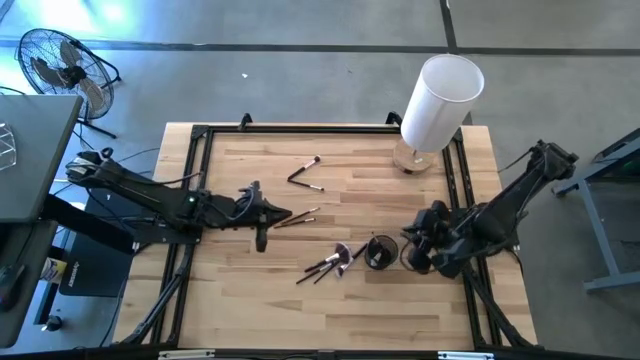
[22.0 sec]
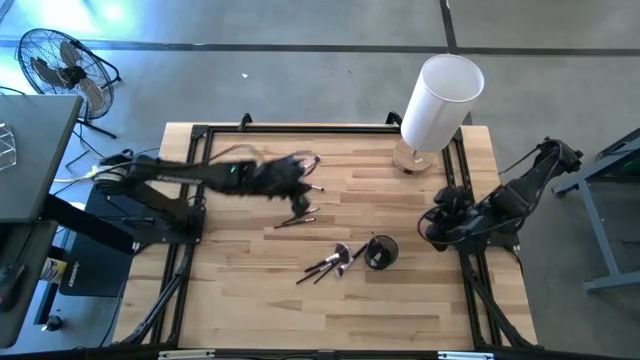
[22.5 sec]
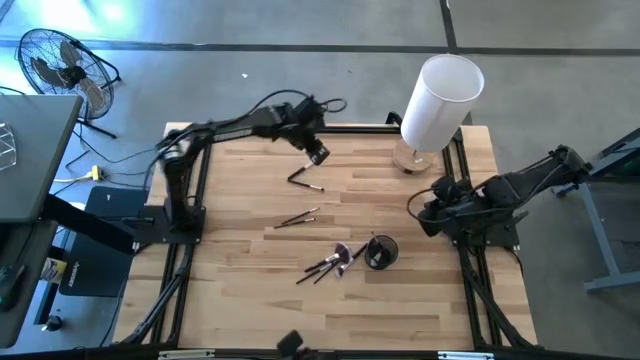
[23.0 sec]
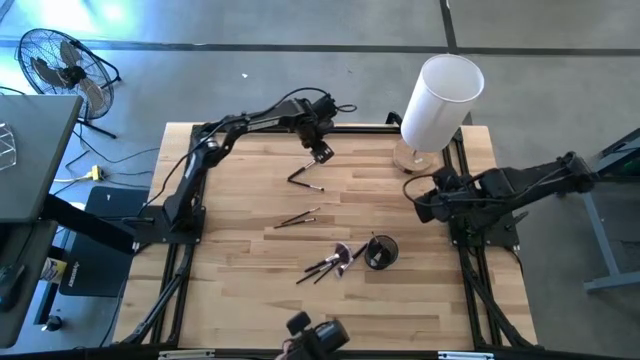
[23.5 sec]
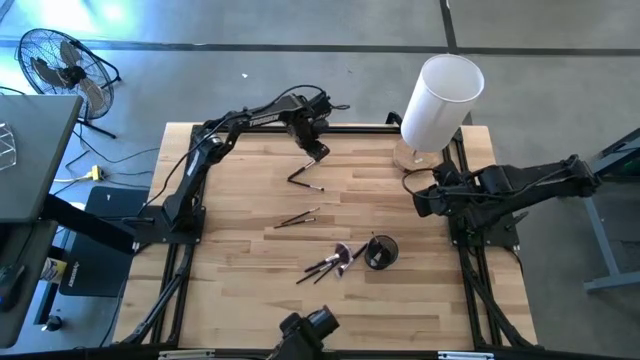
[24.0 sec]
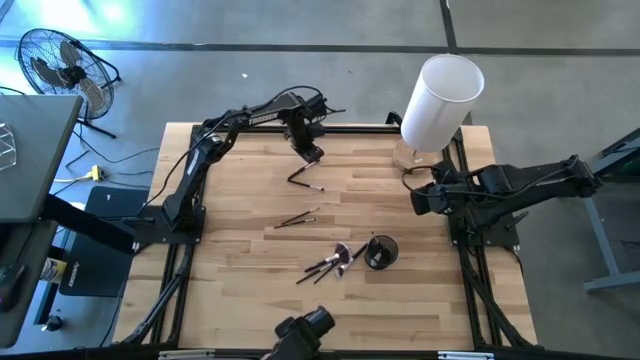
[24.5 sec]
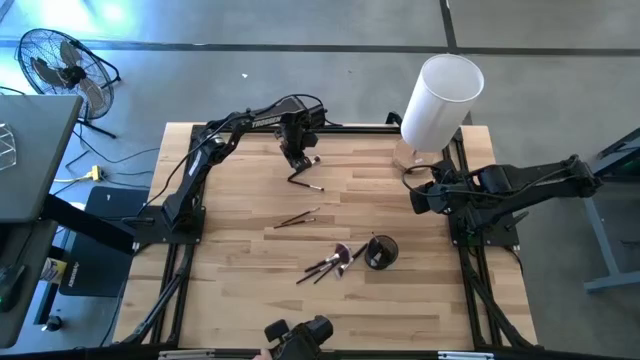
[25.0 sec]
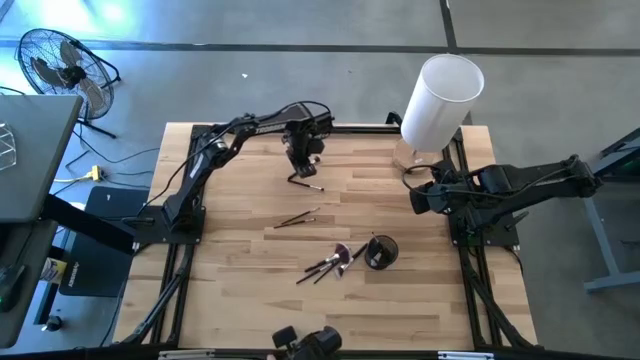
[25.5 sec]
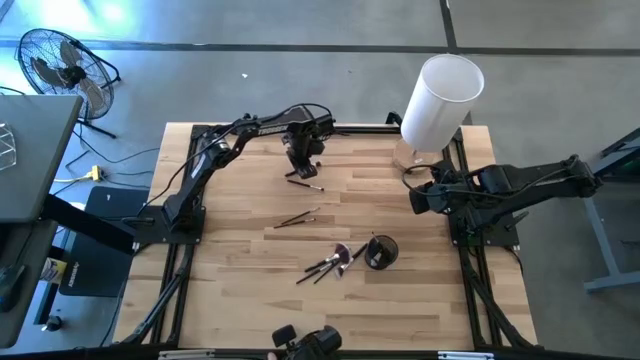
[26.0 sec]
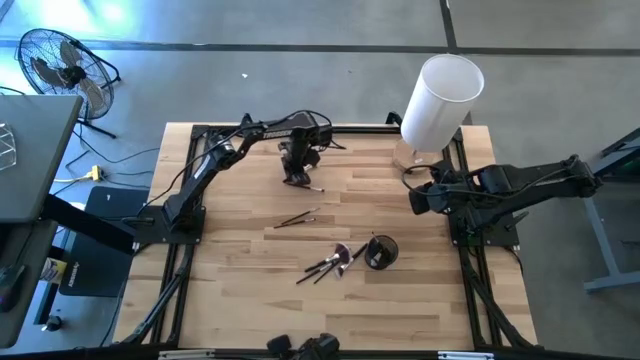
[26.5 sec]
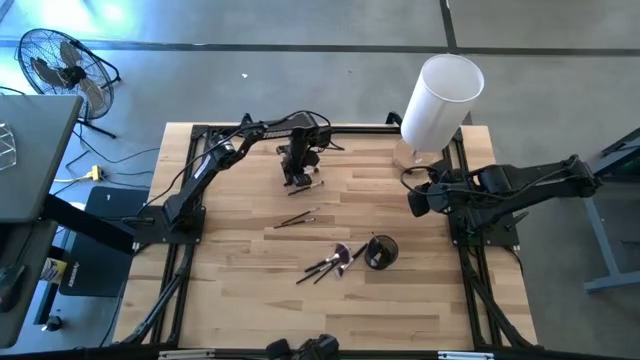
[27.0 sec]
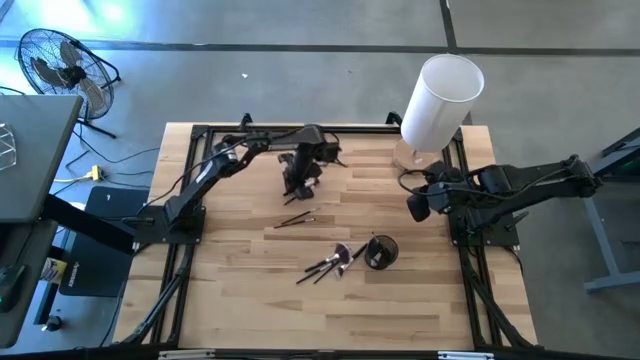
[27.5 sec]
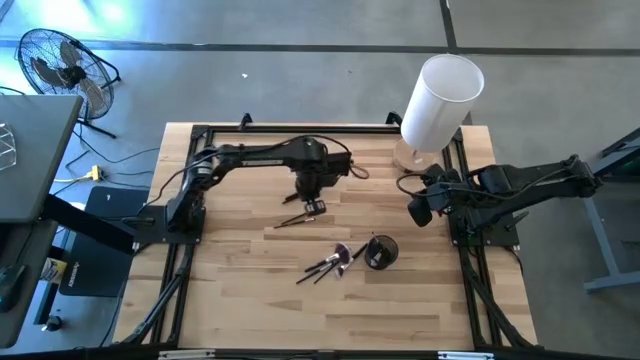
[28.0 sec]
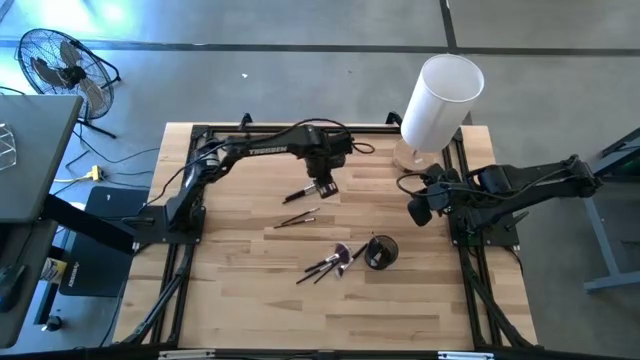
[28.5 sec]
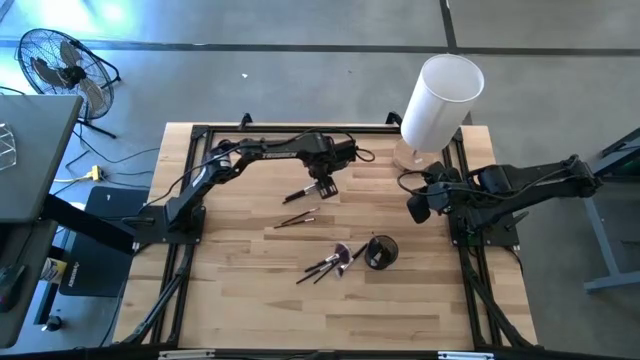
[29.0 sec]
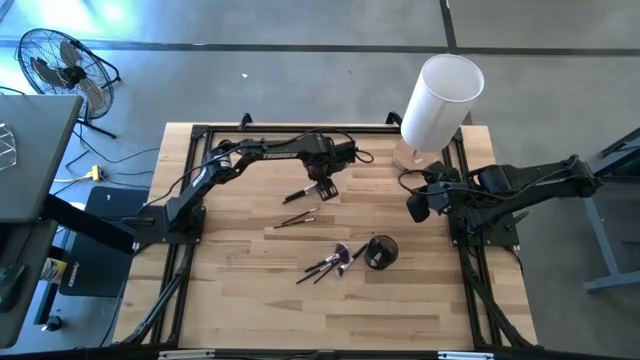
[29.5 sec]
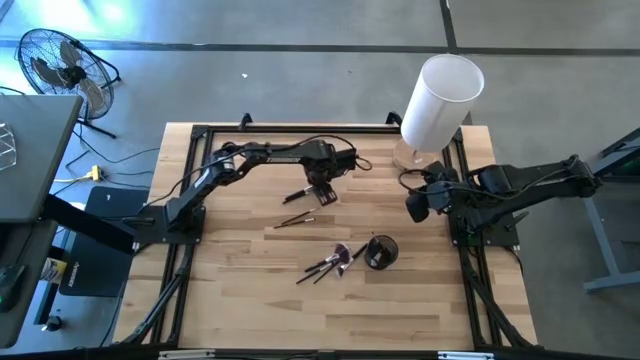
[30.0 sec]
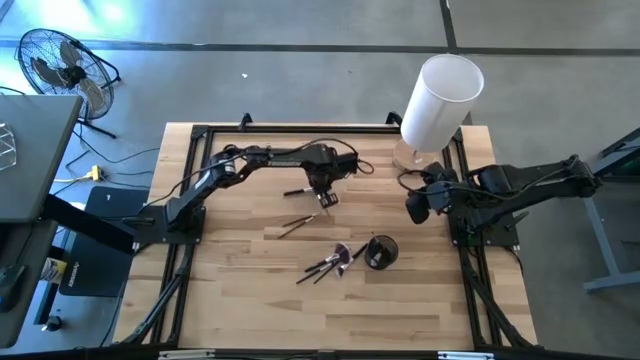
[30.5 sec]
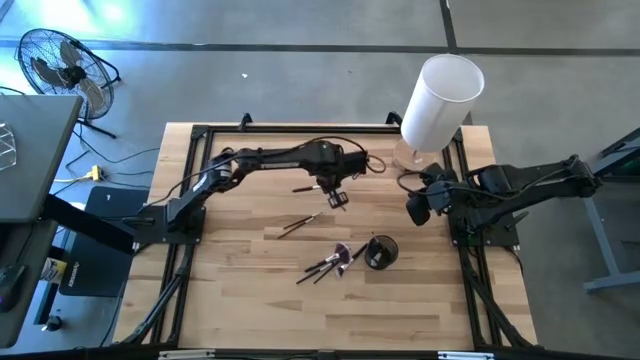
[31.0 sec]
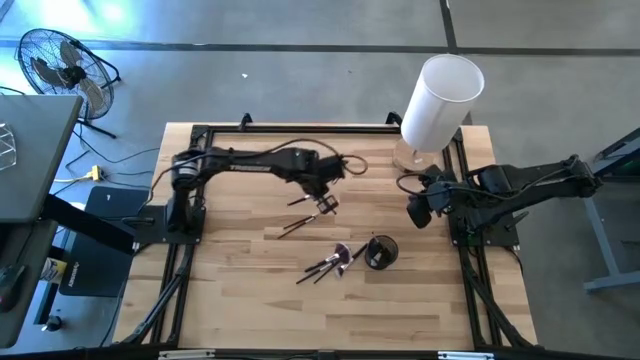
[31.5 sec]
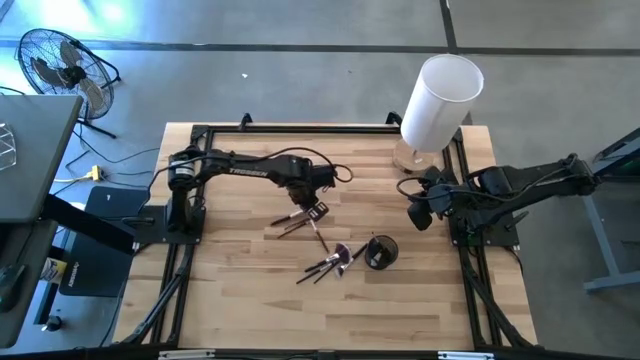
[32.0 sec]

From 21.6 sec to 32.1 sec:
Task: Put items in baskets/containers
Put the blush brush into the mesh organizer

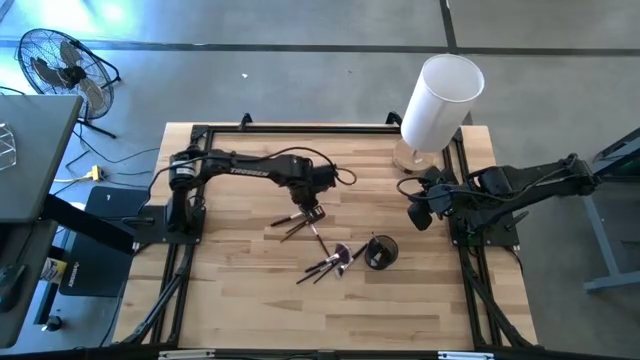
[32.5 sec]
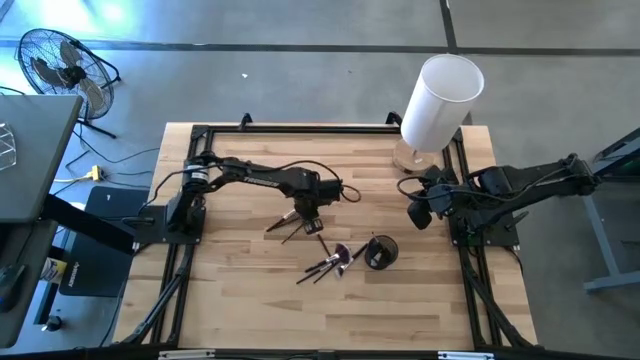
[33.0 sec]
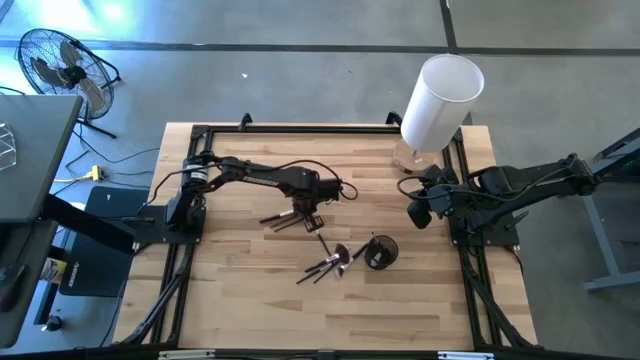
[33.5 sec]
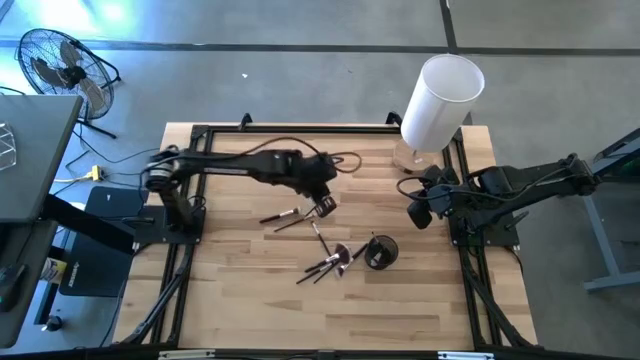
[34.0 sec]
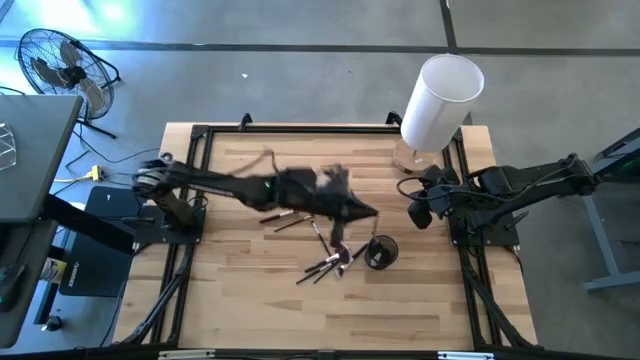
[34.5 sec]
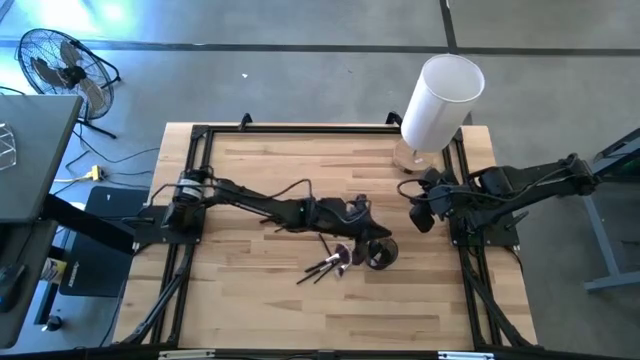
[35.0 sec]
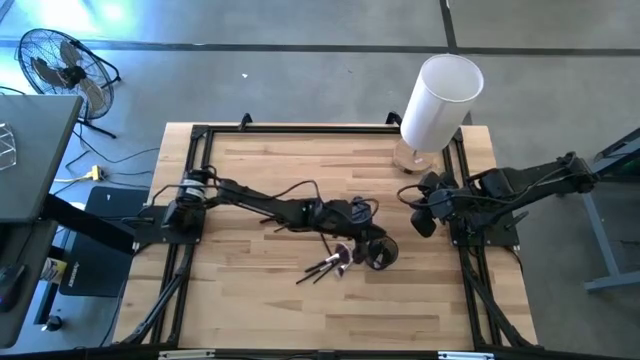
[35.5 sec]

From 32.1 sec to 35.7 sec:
Put the eyeshadow brush into the mesh organizer

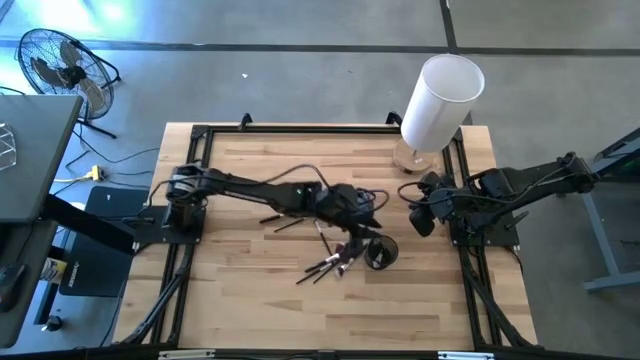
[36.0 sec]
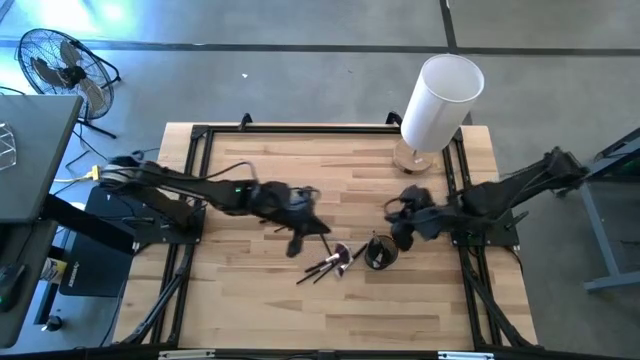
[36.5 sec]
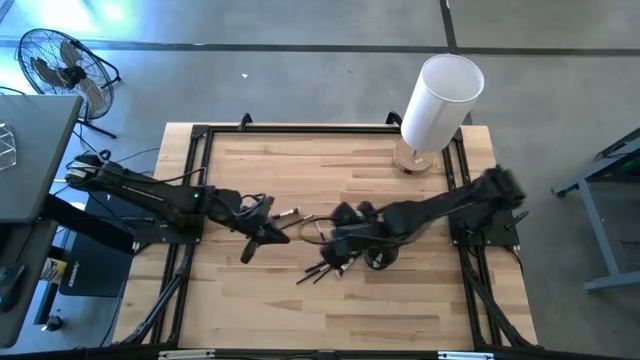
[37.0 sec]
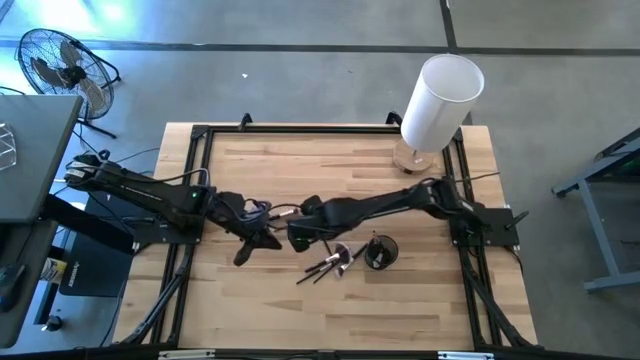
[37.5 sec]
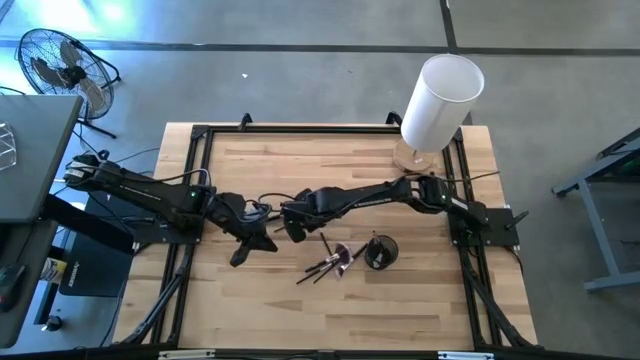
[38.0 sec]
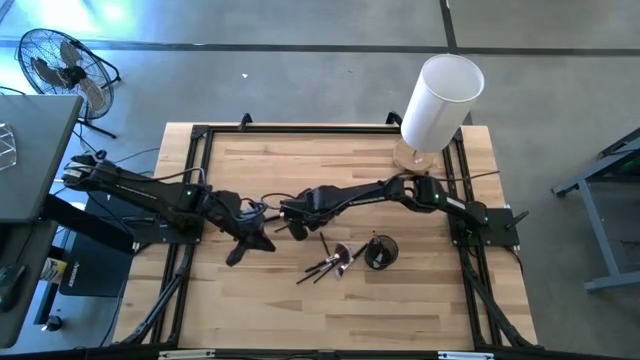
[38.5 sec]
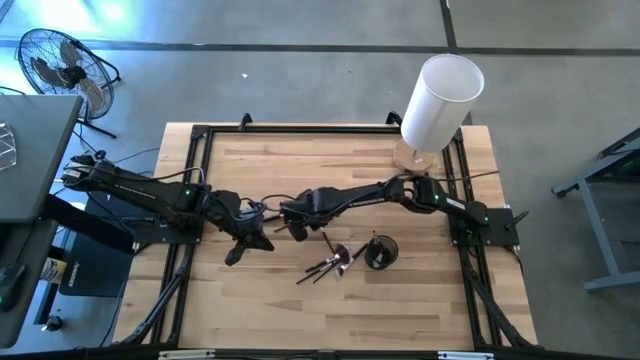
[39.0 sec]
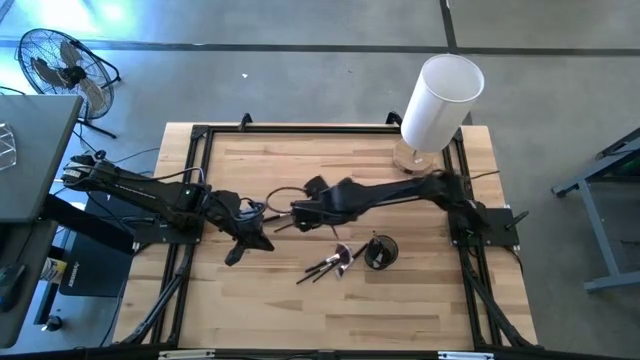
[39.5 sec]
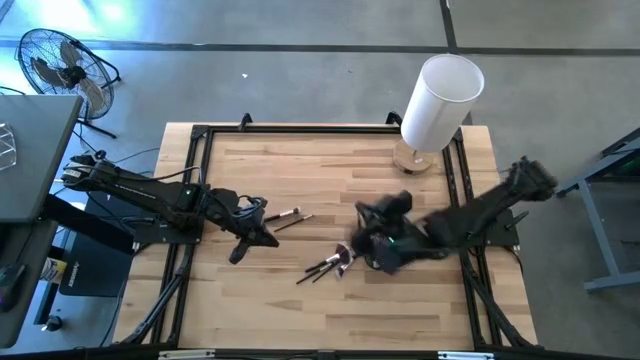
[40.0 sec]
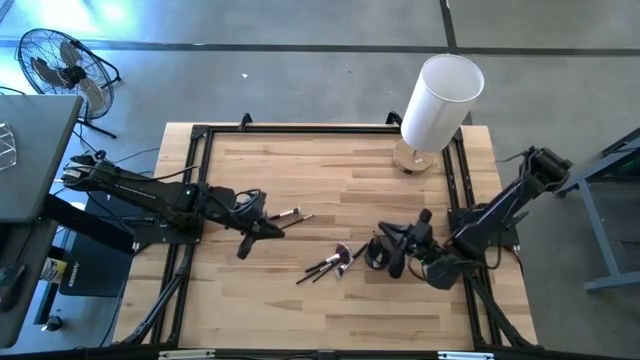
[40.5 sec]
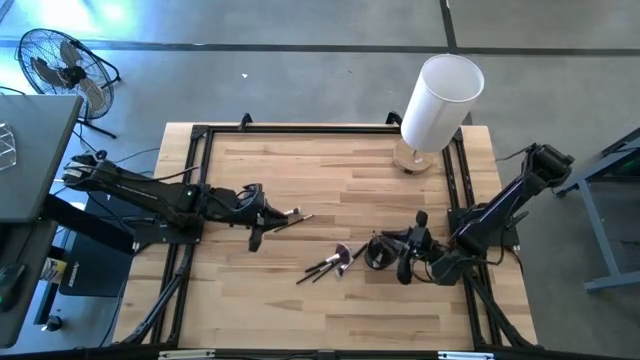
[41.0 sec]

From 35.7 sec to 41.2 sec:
Put the eyeshadow brush into the mesh organizer

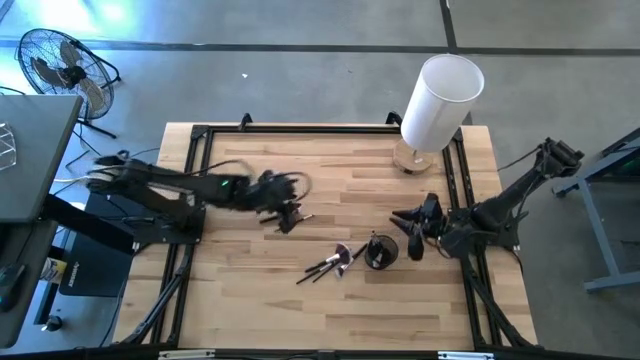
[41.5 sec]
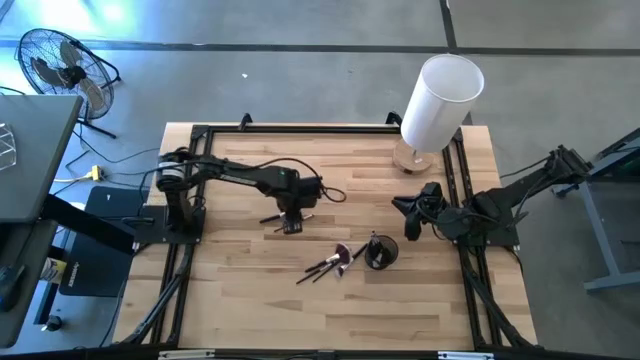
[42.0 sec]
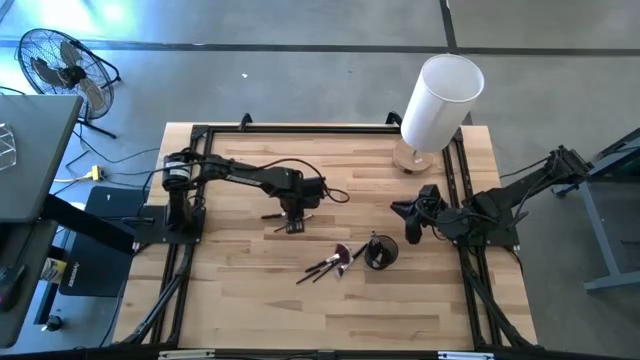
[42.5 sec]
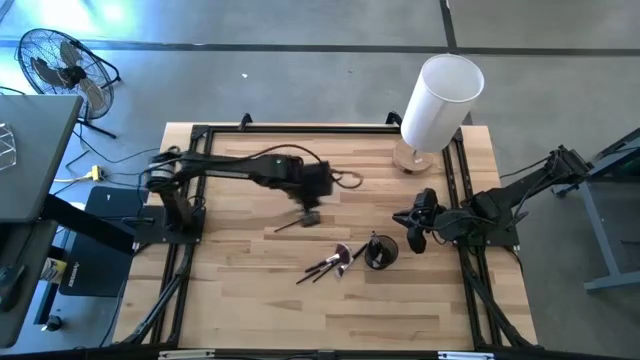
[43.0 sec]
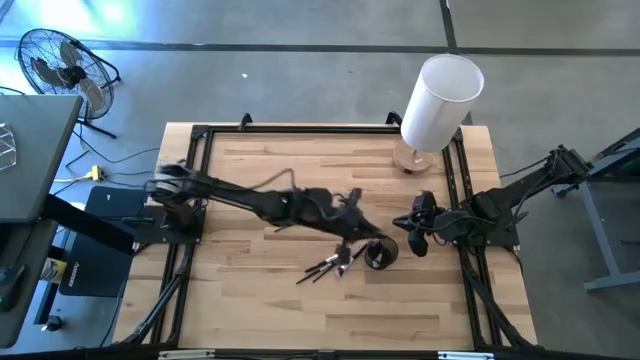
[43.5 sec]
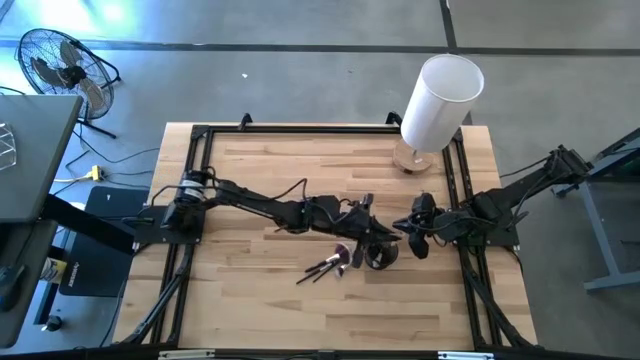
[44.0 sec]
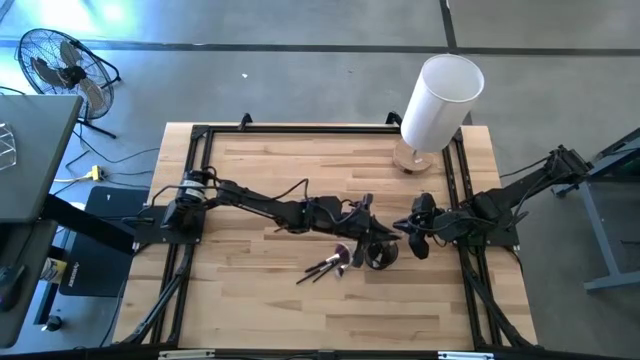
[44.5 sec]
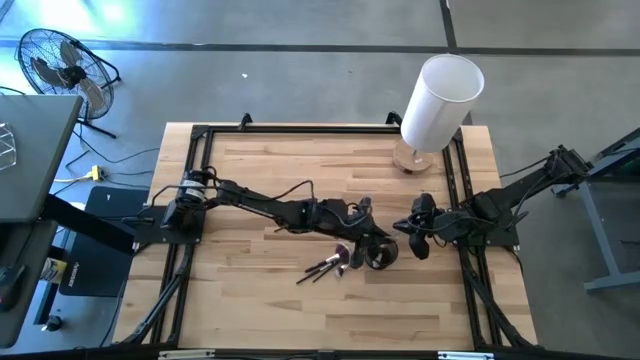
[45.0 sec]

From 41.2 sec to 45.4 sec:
Put the blush brush into the mesh organizer
